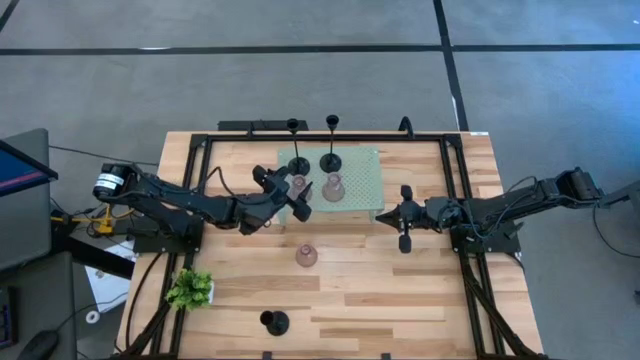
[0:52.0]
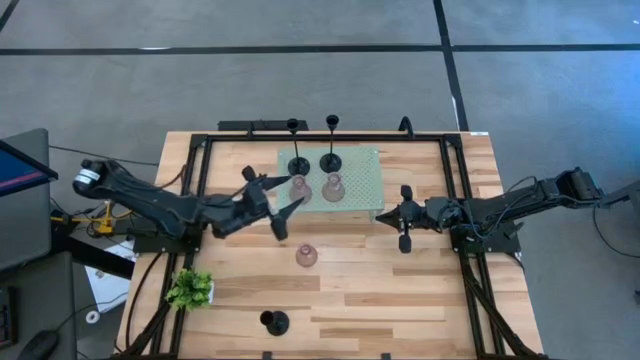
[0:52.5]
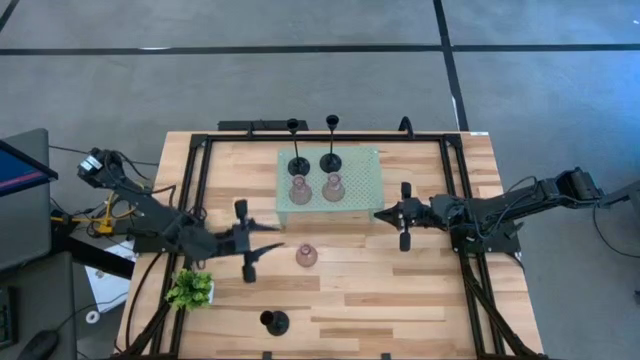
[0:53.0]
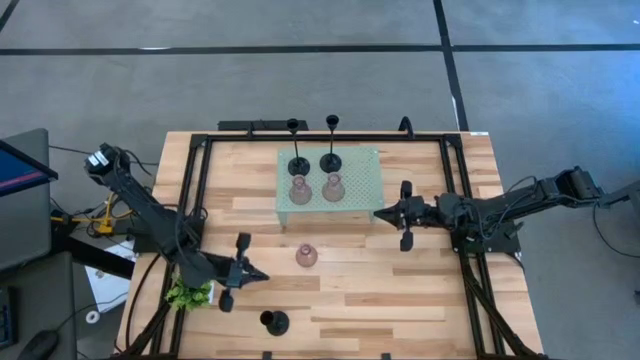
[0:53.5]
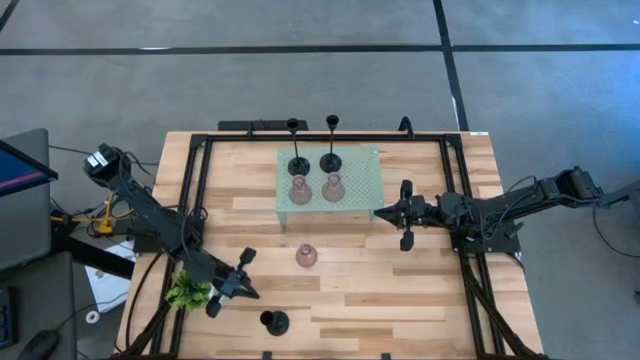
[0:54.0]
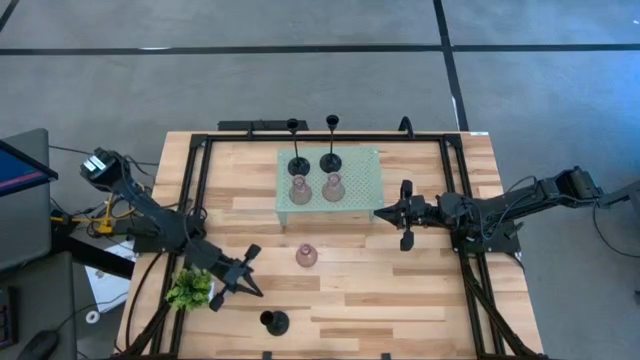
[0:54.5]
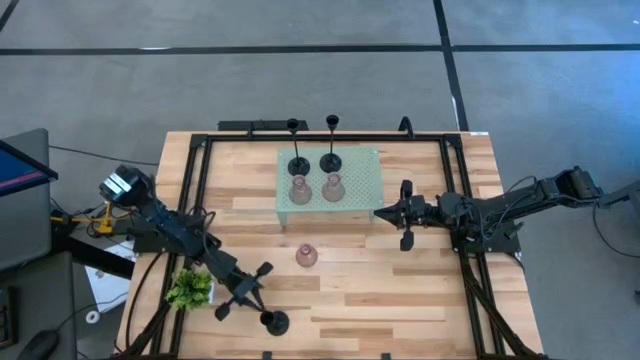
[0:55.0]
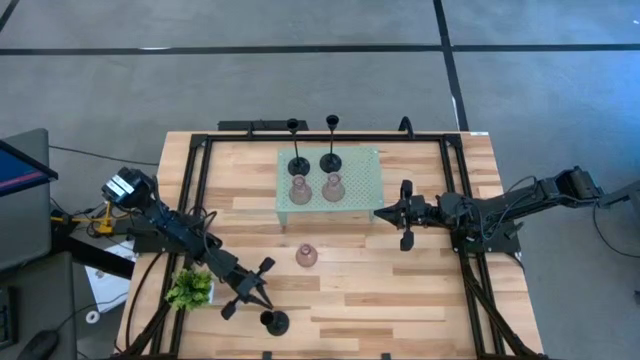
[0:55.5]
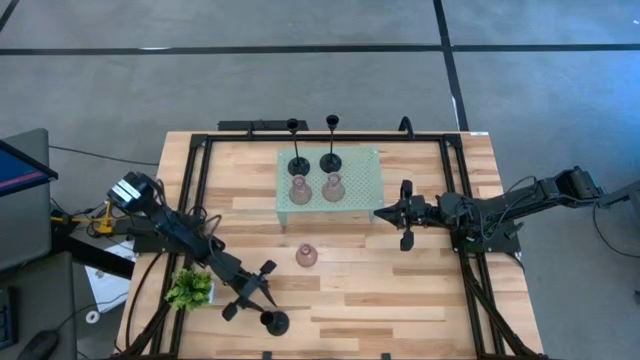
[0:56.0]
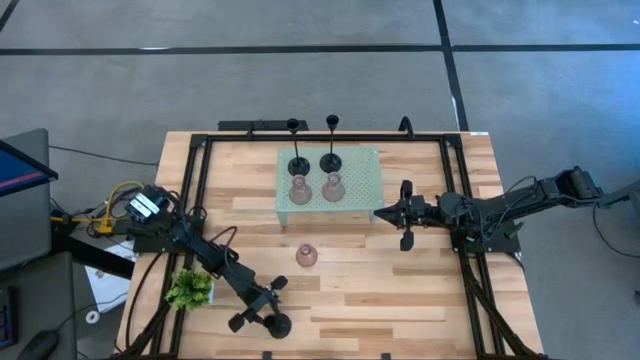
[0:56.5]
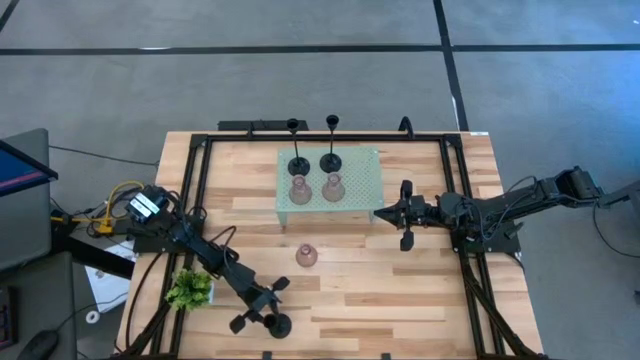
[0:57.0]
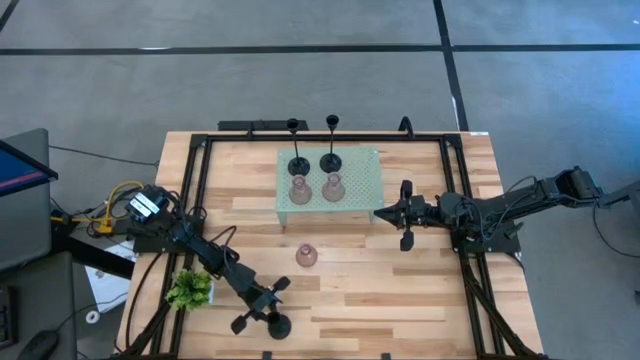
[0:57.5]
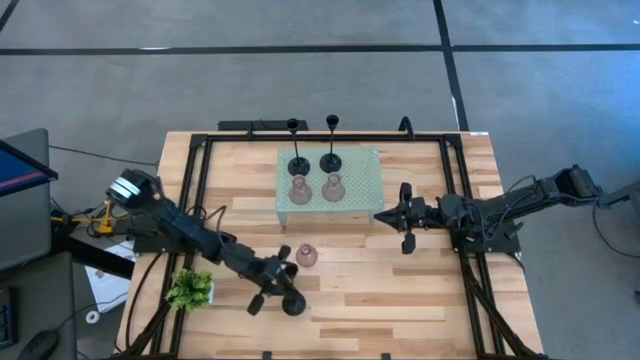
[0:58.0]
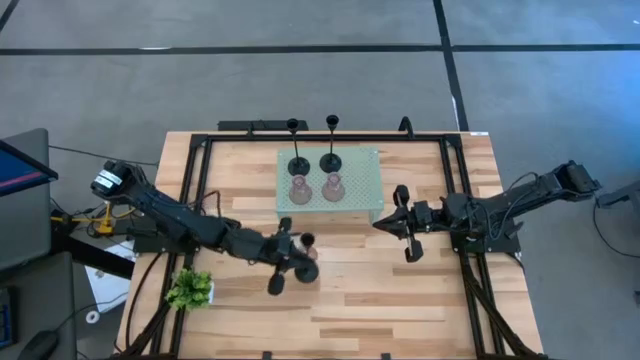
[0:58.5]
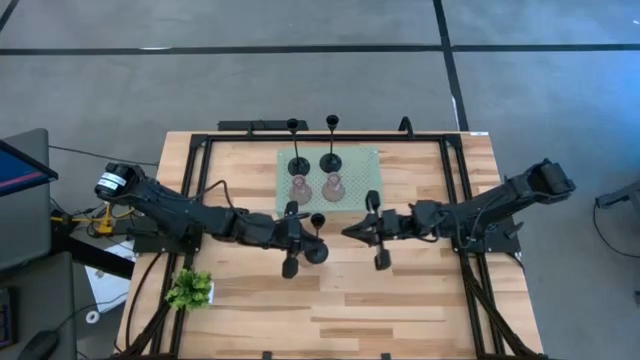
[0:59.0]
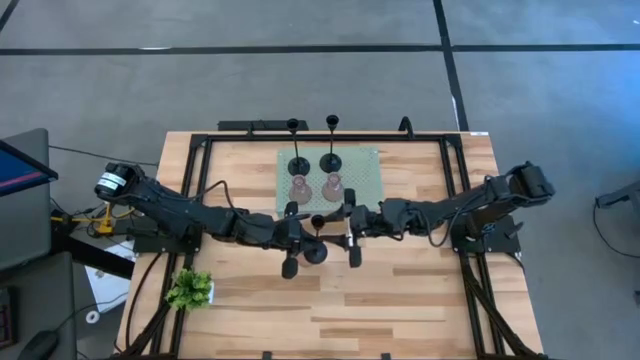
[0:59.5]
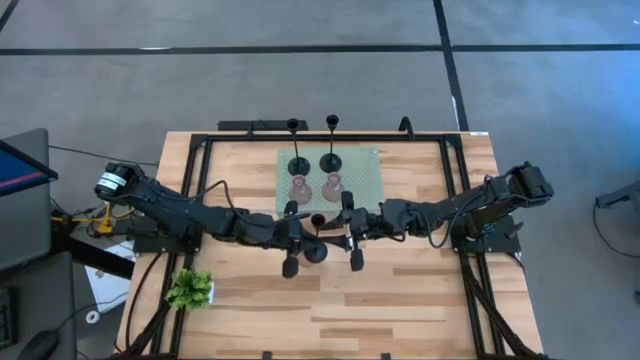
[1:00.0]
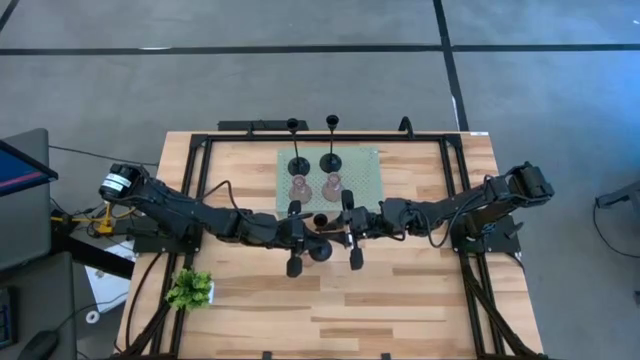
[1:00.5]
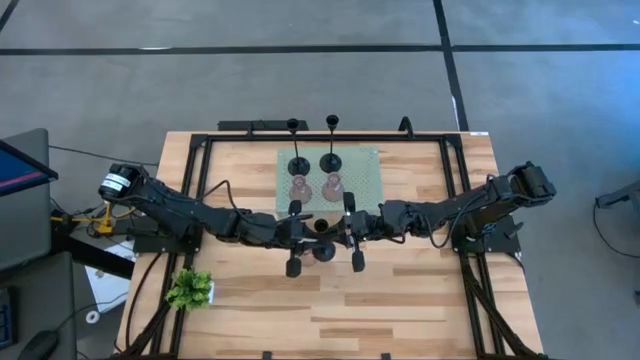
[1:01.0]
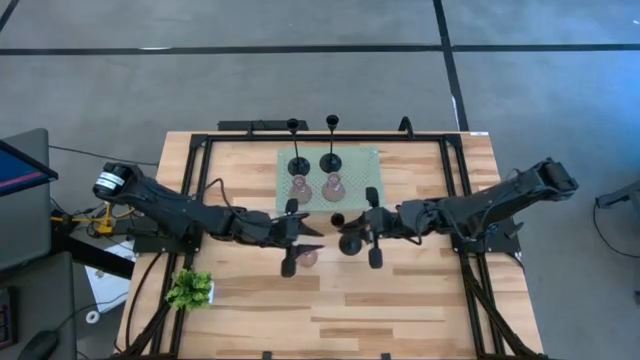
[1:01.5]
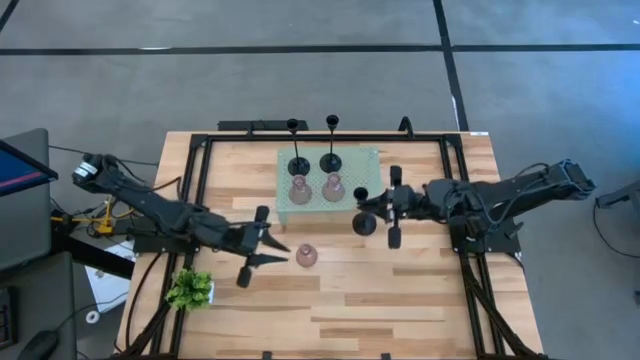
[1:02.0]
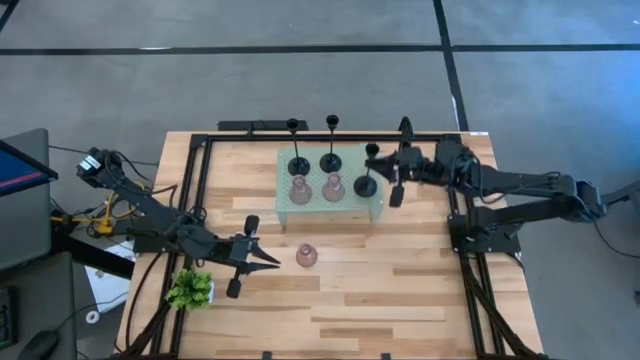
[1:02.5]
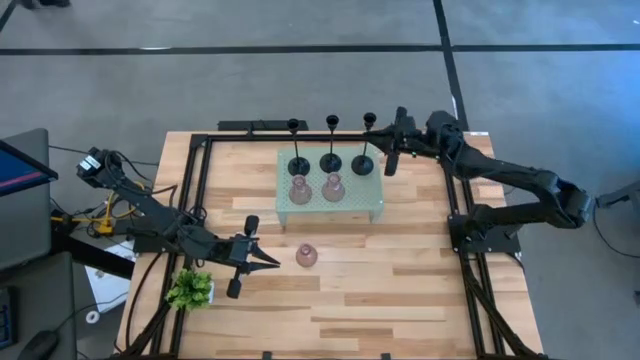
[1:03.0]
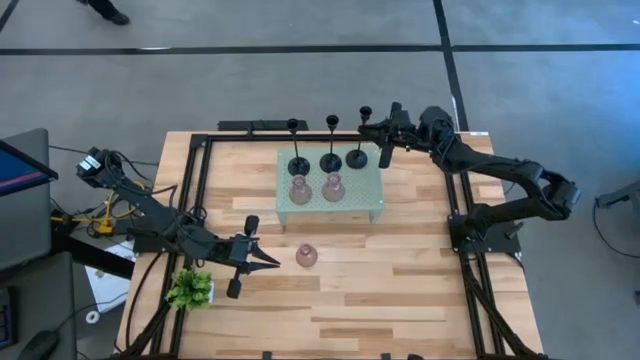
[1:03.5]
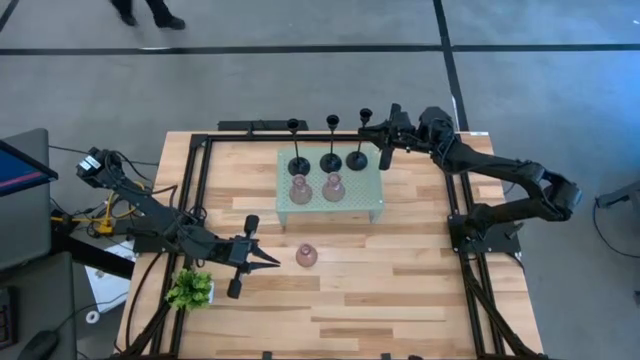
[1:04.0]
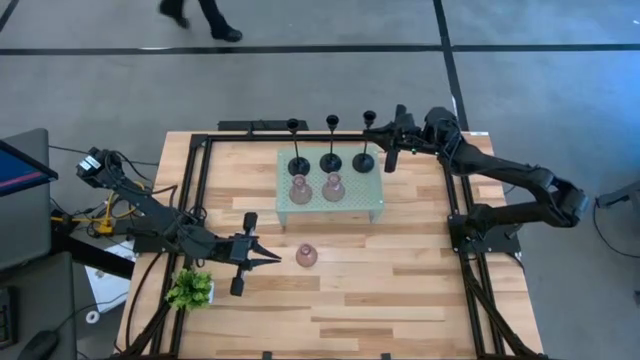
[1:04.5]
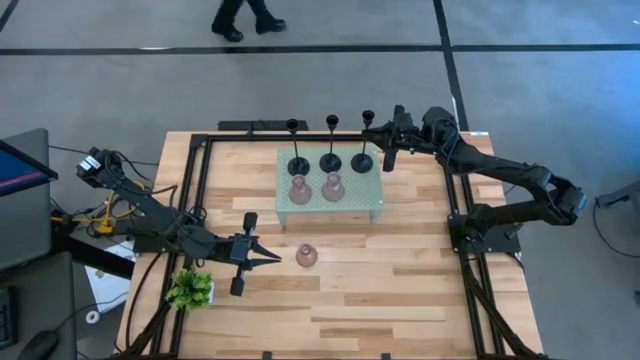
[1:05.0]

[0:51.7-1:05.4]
Task: Pick & Place candle stick holders
Put the black candle holder on the shelf

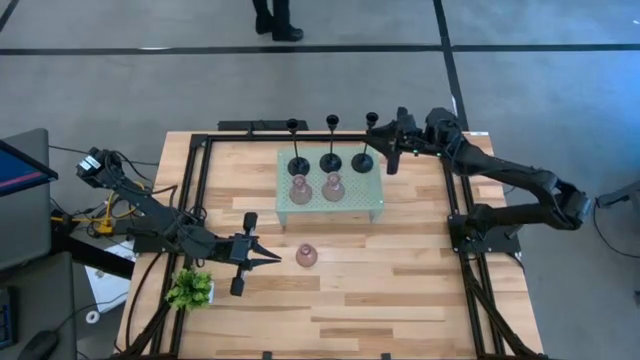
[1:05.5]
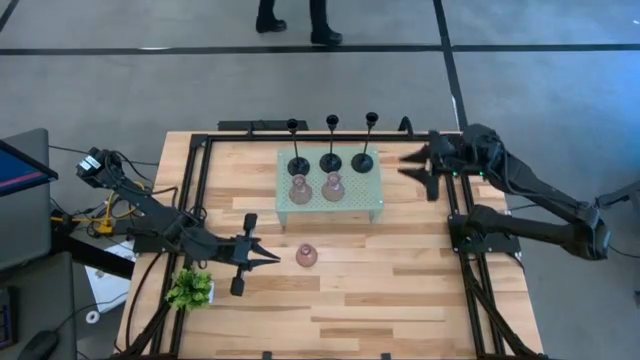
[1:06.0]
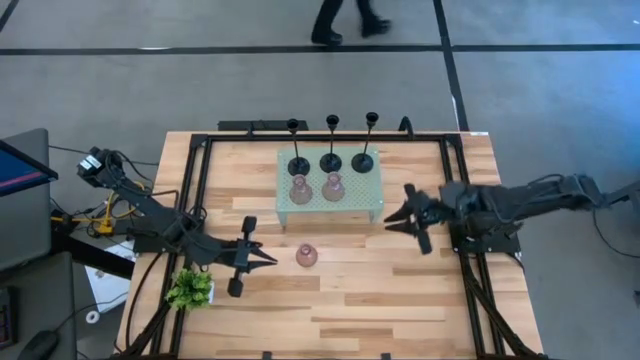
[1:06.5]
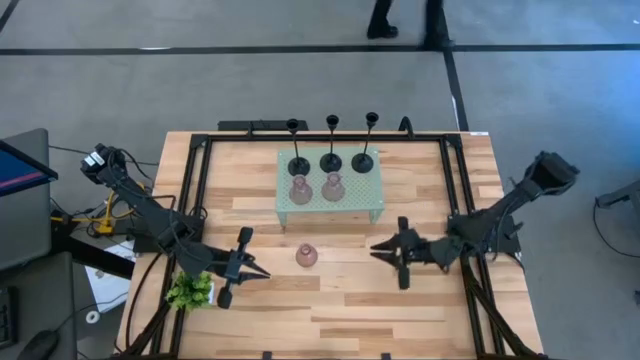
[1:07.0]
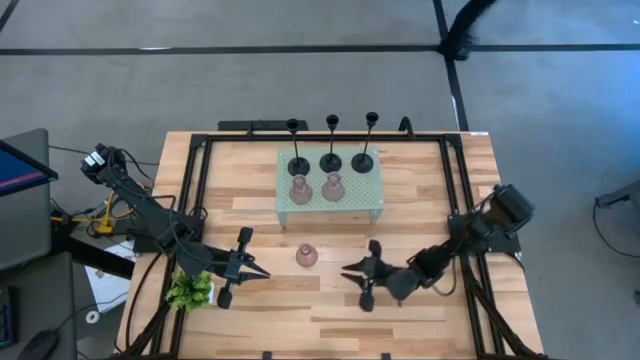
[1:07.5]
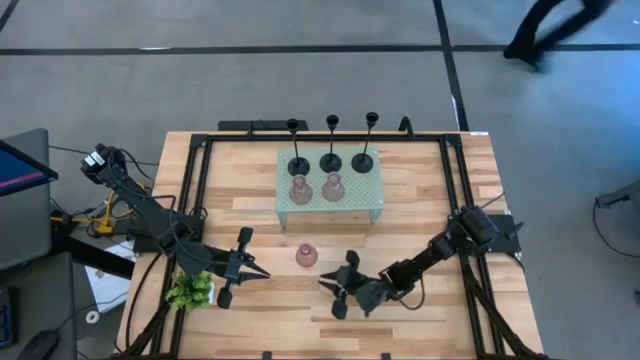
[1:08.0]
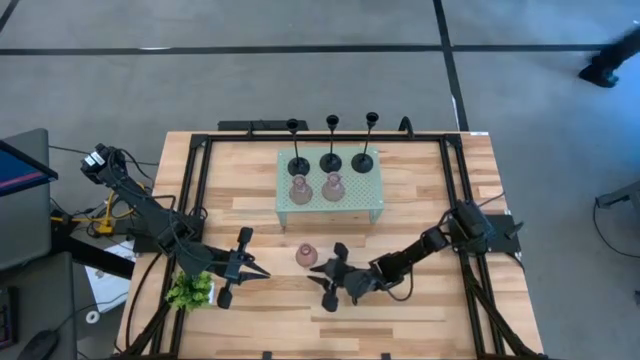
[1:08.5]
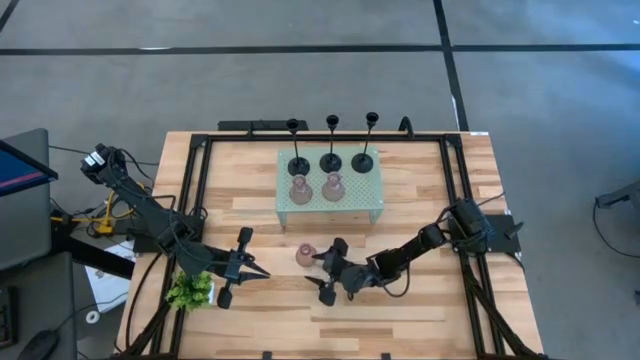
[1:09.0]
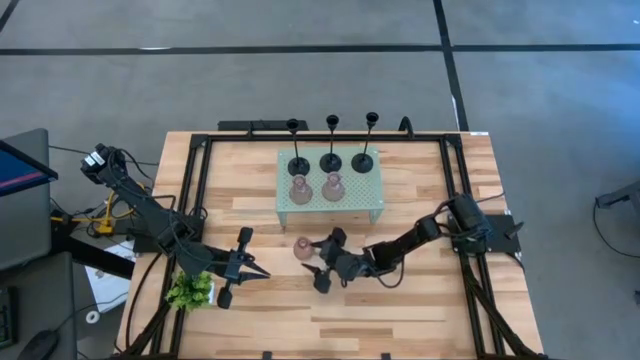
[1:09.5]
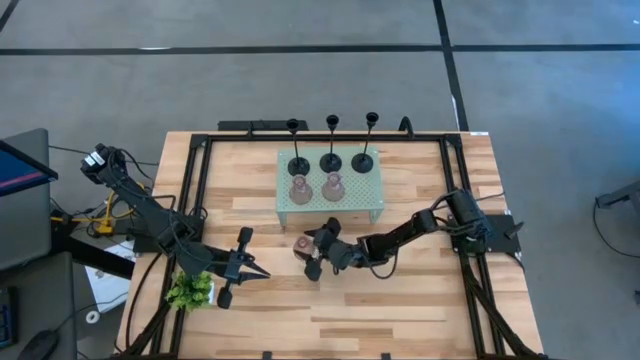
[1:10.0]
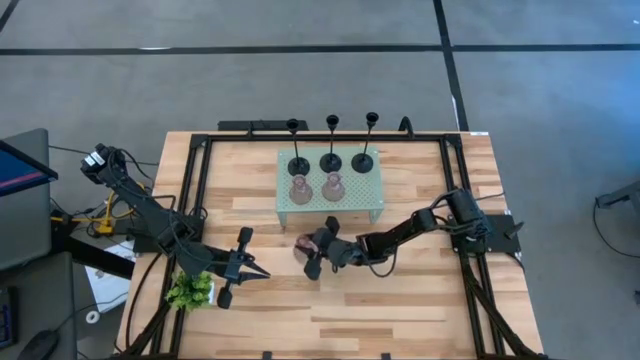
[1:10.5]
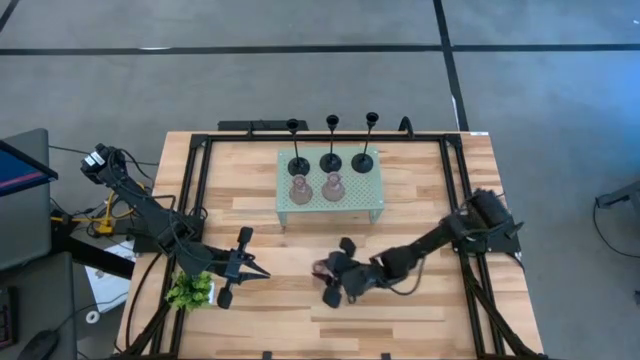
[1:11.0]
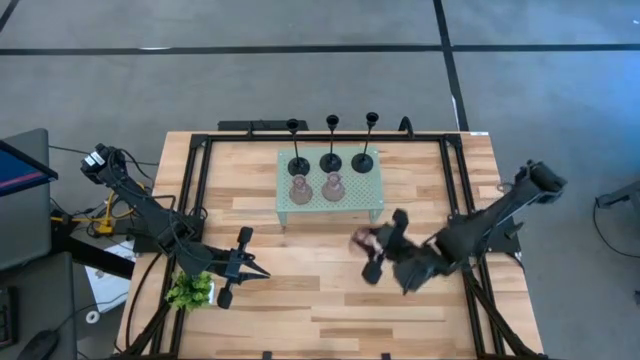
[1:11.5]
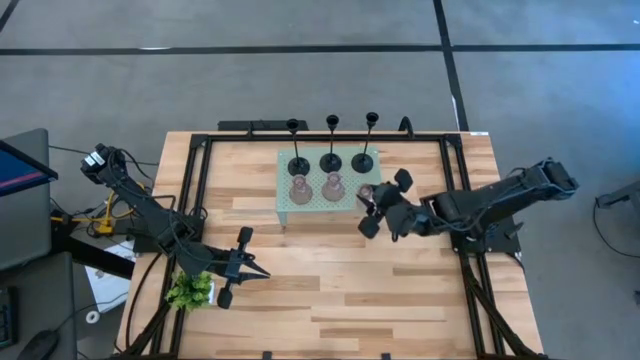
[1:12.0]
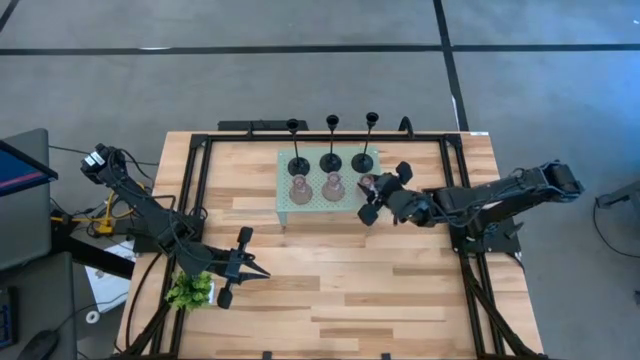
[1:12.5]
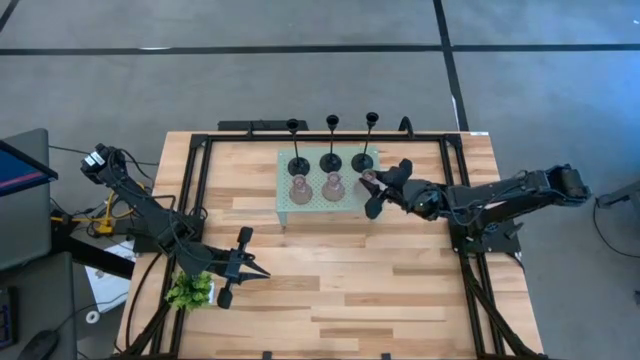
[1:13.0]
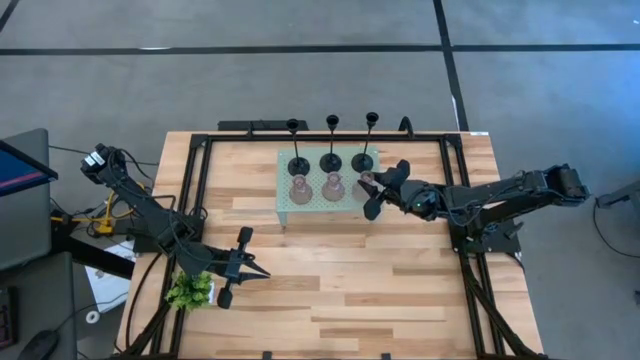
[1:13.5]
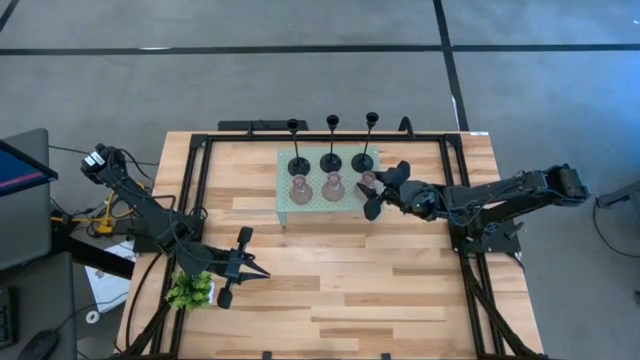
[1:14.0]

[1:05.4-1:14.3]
Put the pink glass candle holder on the shelf
